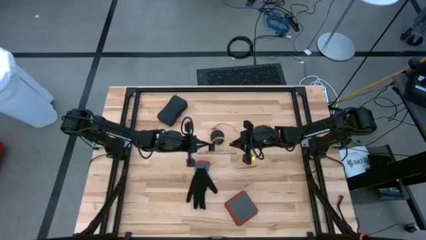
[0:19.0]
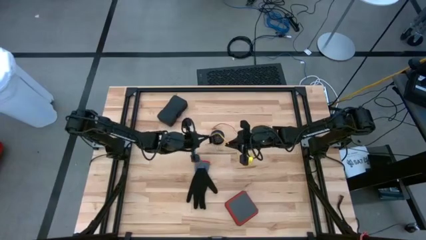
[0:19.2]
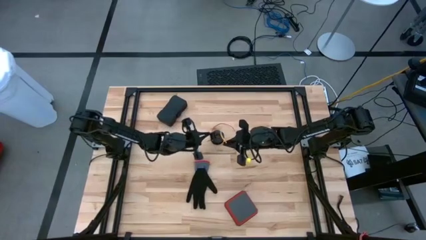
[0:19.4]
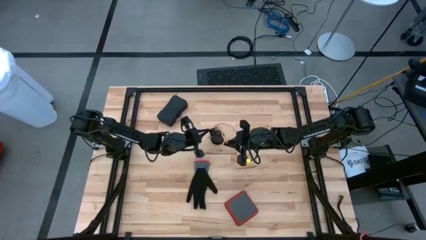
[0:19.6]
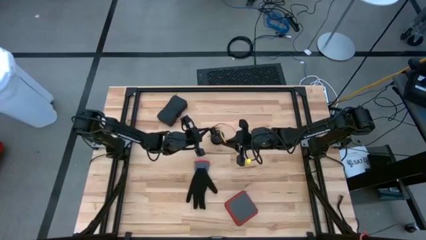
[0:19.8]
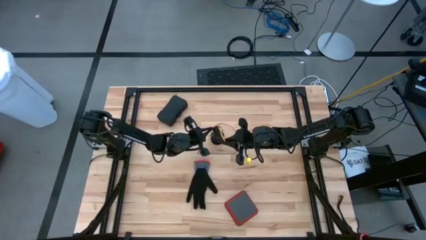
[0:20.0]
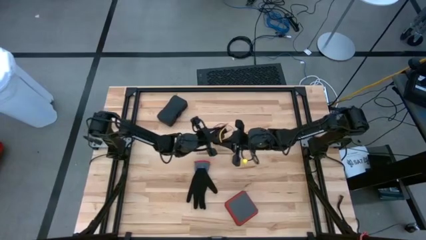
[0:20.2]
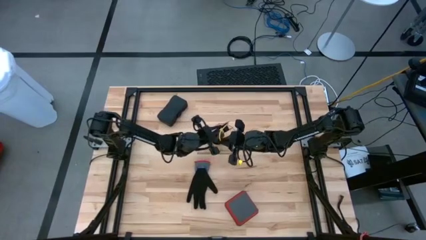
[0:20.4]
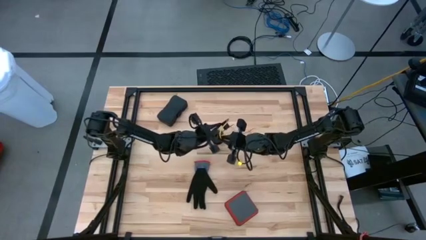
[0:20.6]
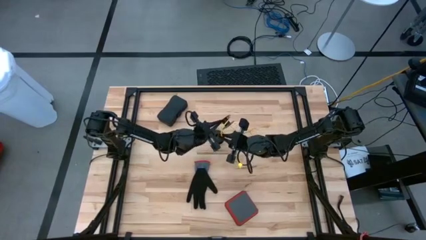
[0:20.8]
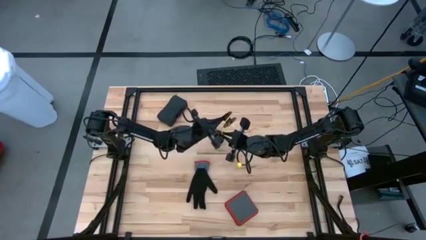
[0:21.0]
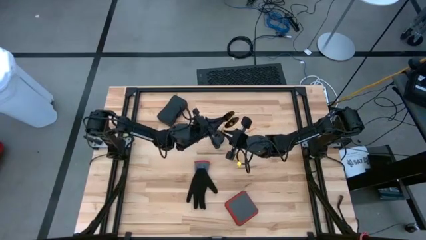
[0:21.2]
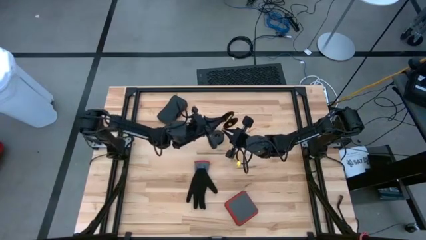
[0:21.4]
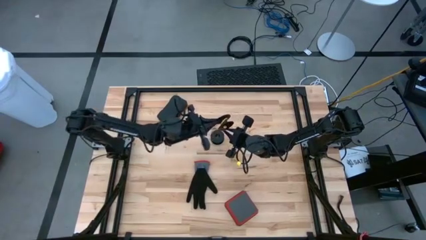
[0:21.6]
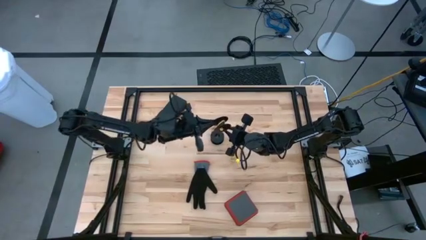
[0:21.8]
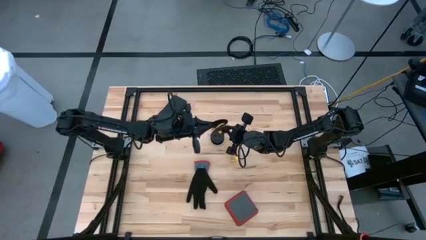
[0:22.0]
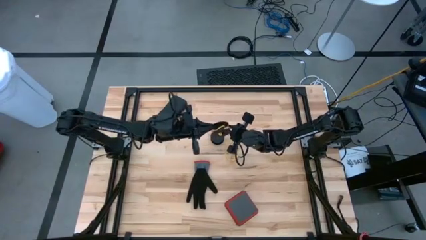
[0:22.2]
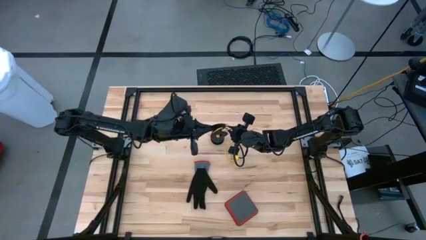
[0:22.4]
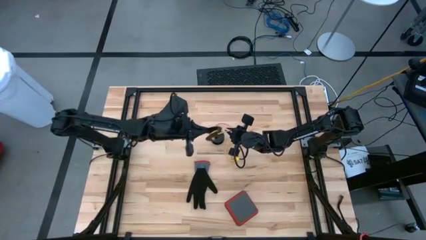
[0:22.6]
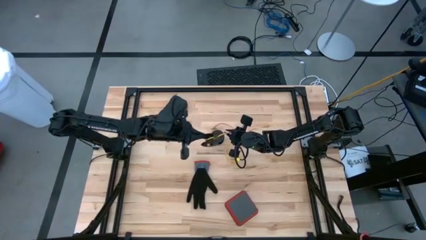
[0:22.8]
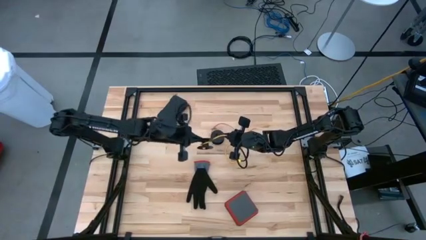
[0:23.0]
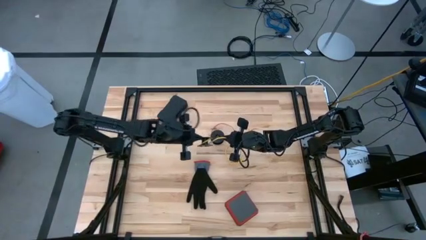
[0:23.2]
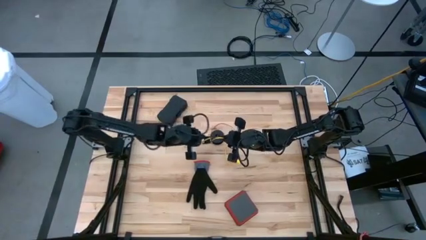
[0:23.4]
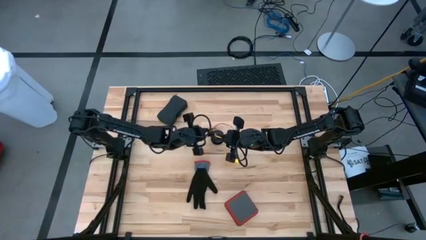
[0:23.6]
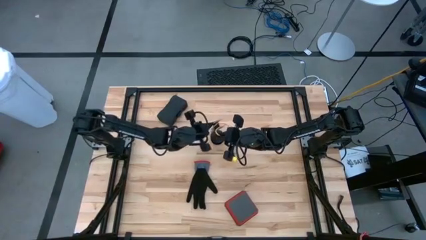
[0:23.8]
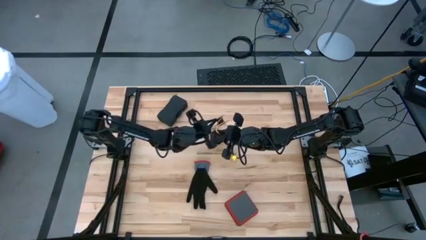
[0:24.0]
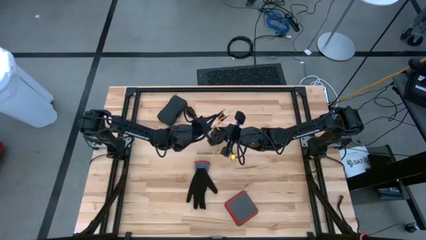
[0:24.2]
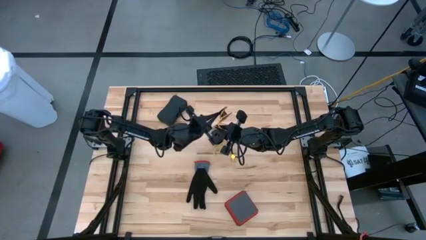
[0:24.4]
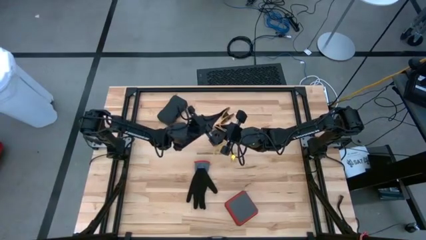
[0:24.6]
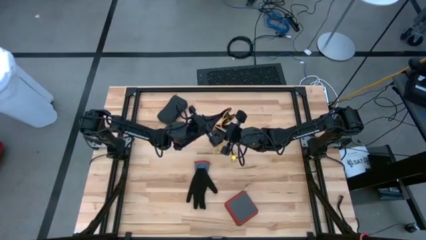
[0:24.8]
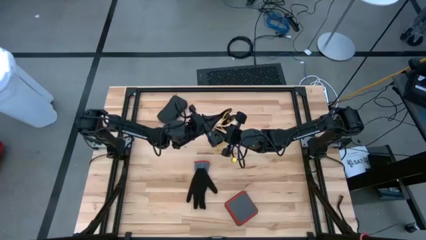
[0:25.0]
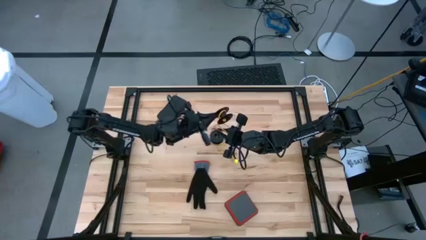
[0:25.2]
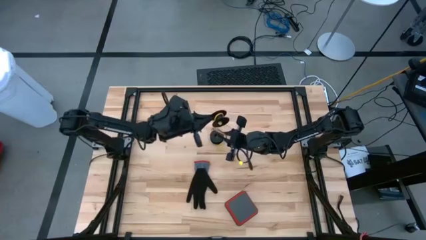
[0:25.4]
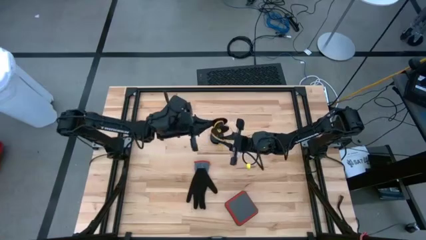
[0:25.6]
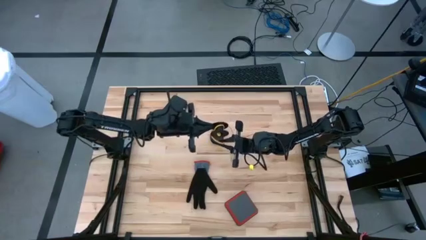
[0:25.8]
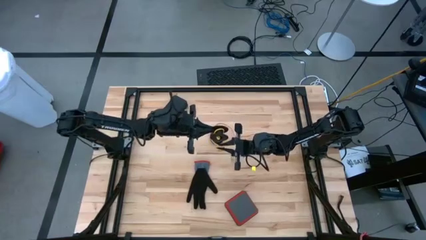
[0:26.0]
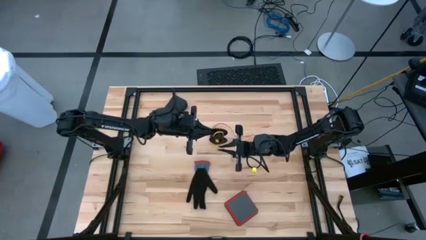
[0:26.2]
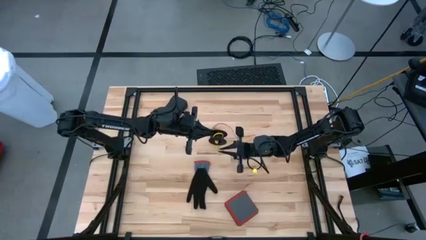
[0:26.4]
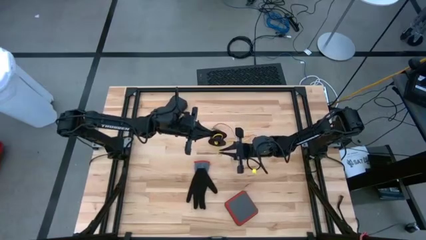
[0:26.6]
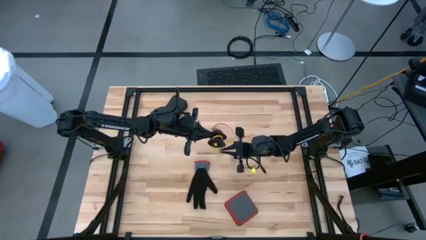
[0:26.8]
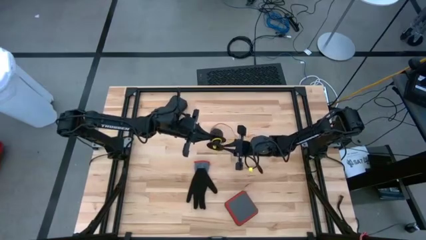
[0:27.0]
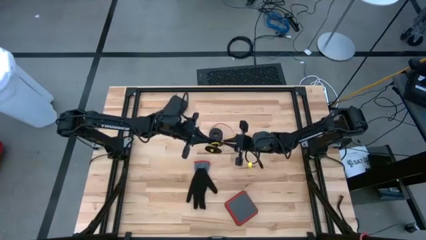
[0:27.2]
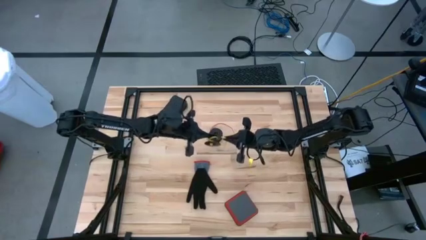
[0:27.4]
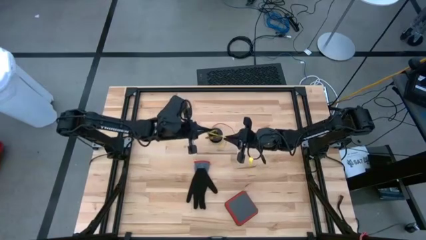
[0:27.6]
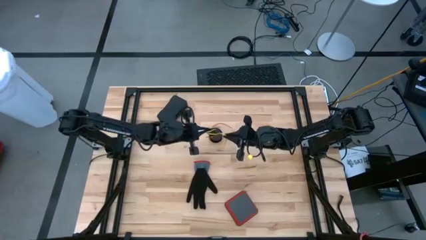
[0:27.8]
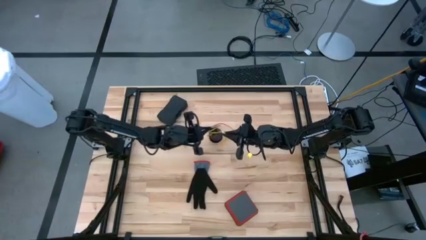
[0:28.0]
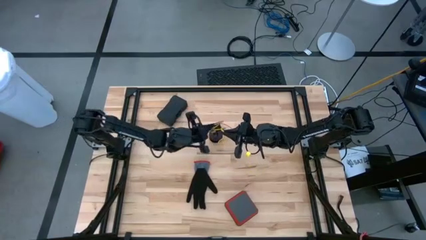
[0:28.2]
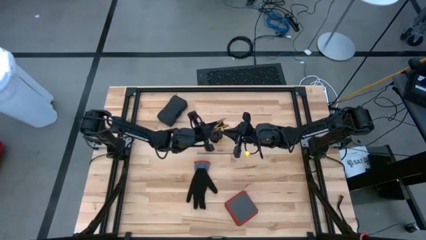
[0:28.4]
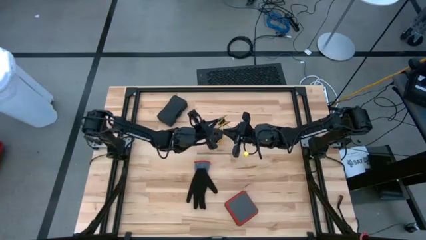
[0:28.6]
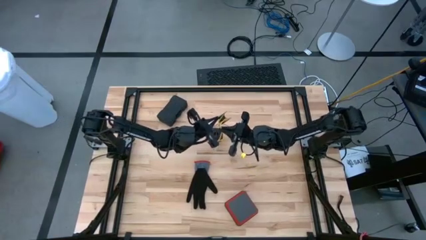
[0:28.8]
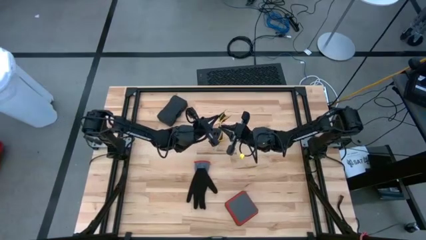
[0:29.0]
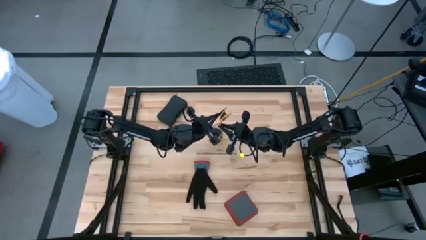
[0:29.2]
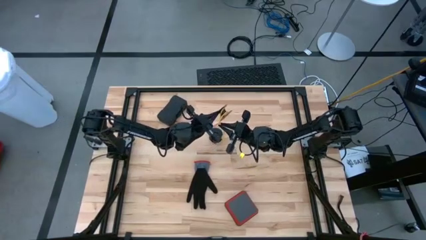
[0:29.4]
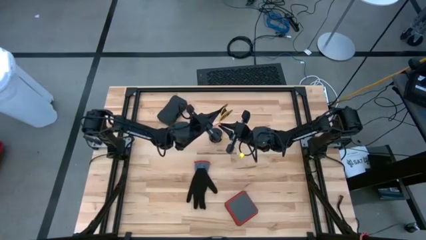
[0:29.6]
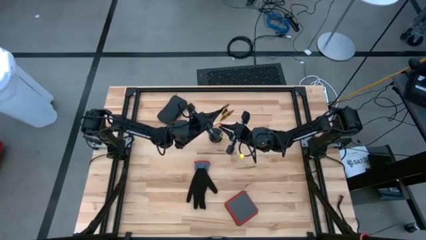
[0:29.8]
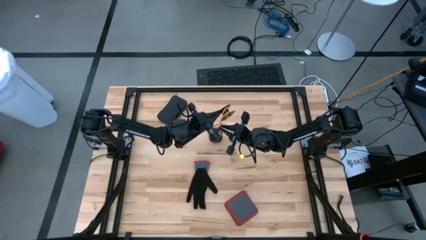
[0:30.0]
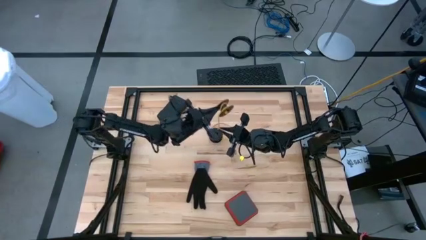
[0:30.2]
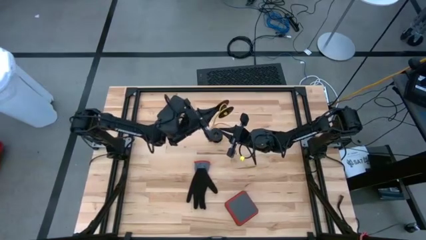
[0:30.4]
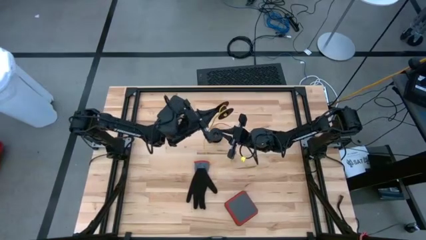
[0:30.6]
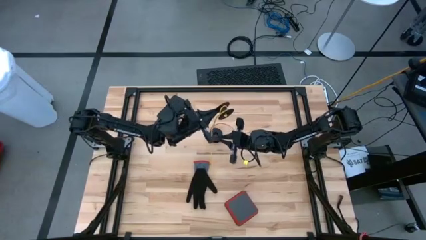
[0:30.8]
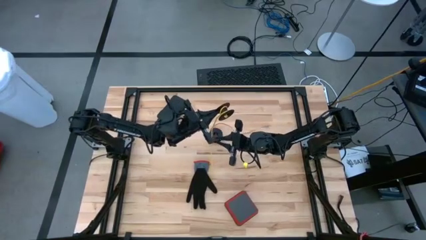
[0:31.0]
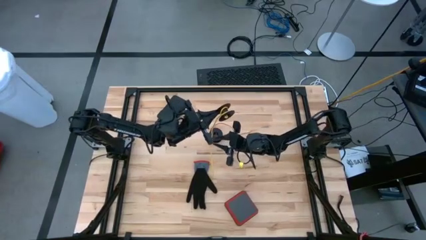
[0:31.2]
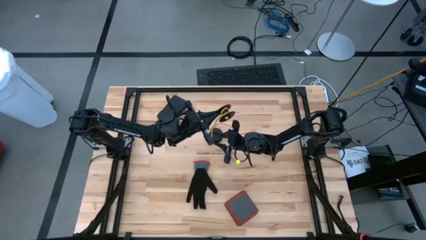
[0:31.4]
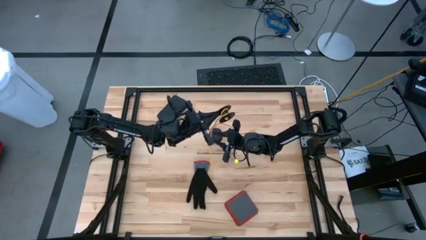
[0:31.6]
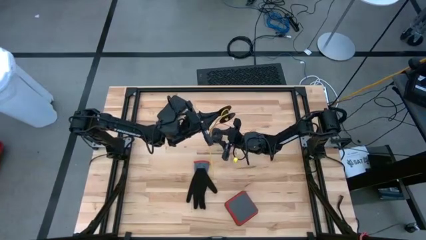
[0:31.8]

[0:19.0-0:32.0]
Task: Coil cords
Coil the yellow wire onto the black spool
